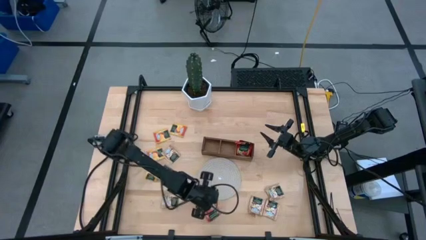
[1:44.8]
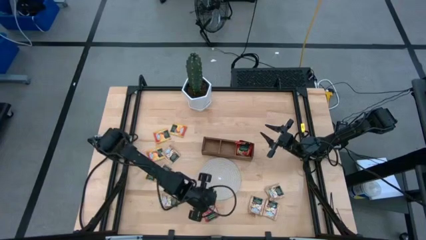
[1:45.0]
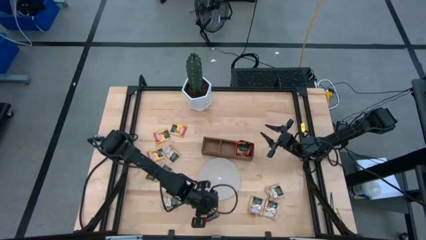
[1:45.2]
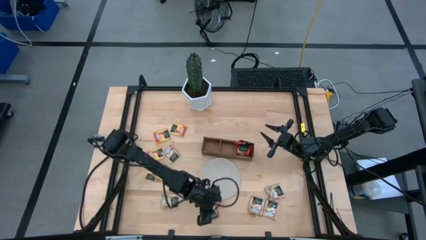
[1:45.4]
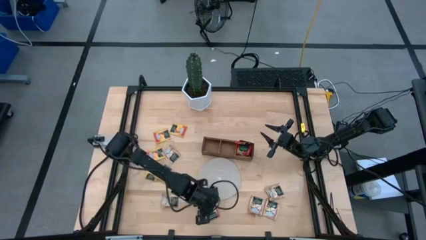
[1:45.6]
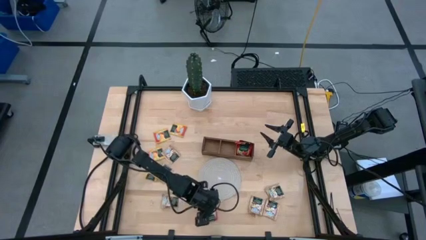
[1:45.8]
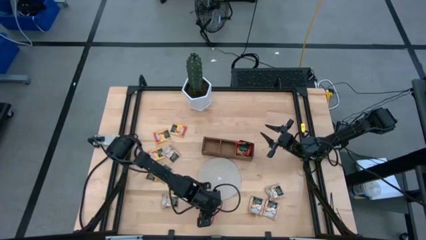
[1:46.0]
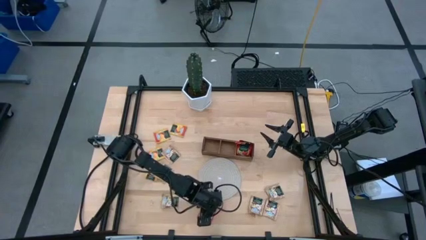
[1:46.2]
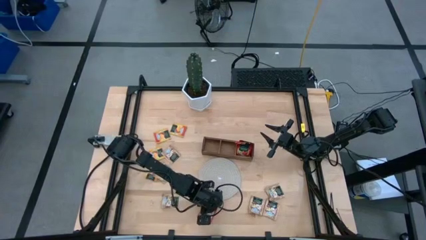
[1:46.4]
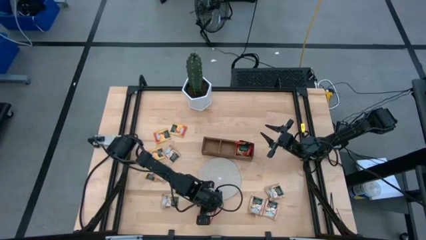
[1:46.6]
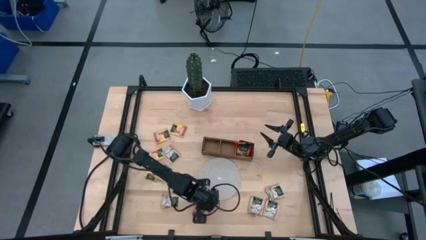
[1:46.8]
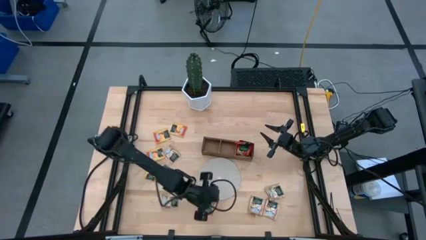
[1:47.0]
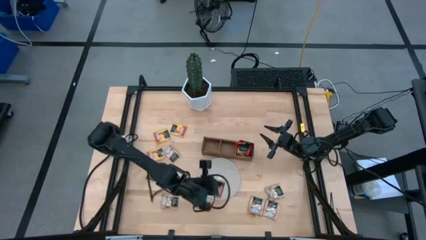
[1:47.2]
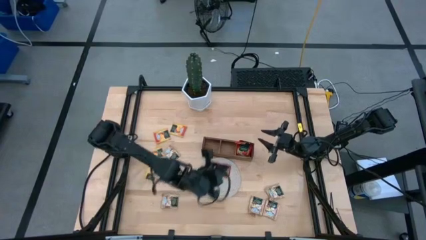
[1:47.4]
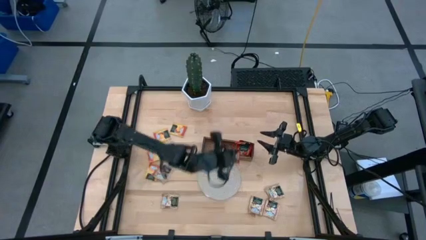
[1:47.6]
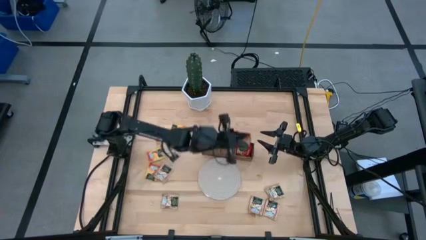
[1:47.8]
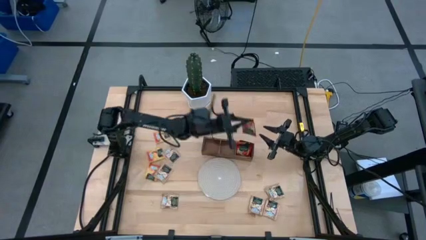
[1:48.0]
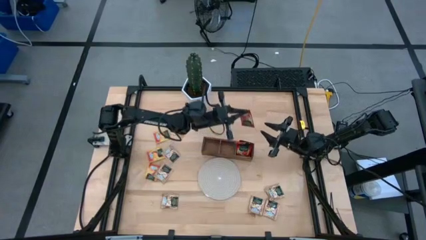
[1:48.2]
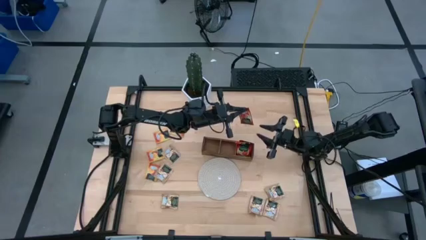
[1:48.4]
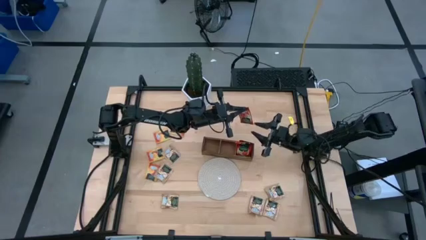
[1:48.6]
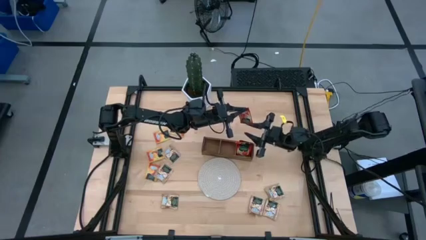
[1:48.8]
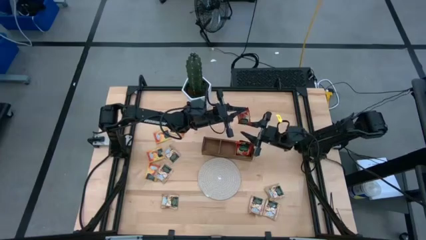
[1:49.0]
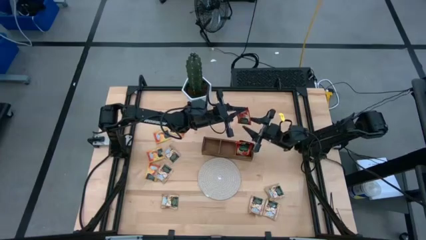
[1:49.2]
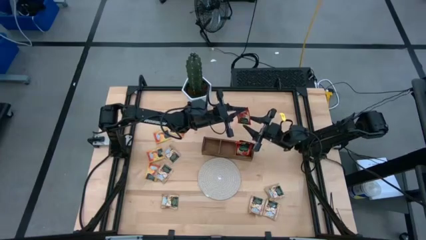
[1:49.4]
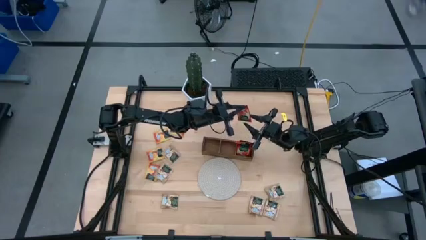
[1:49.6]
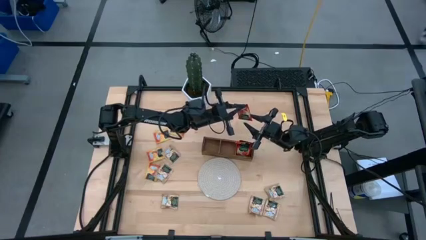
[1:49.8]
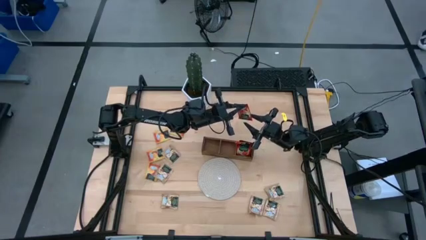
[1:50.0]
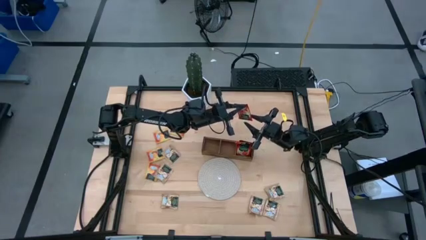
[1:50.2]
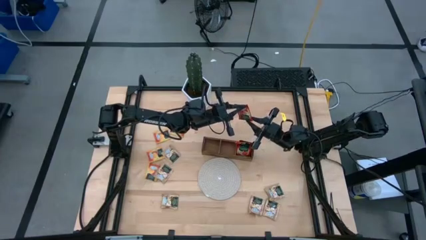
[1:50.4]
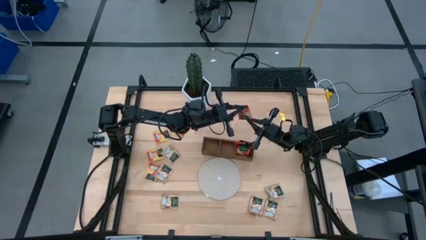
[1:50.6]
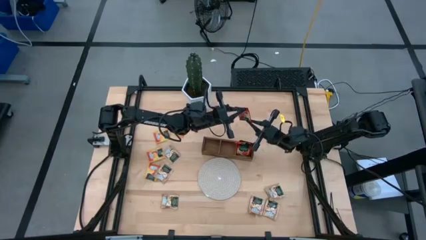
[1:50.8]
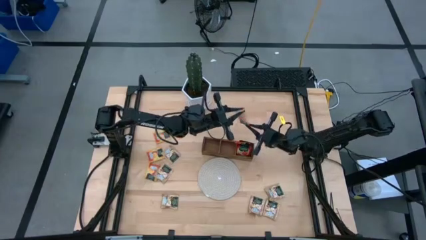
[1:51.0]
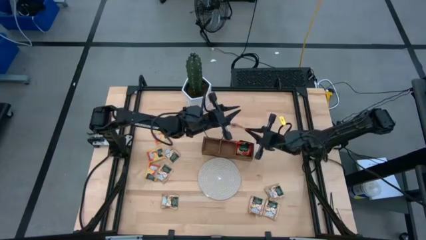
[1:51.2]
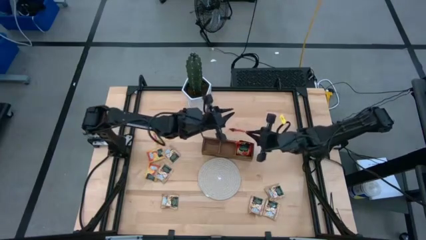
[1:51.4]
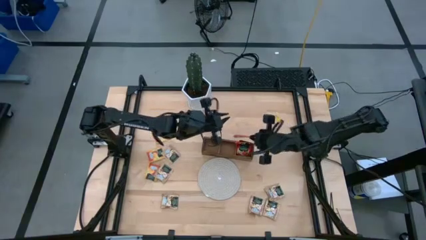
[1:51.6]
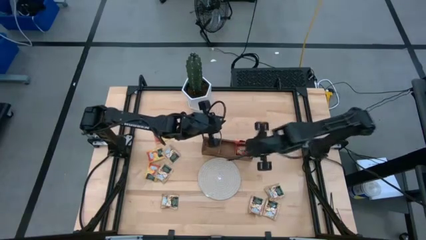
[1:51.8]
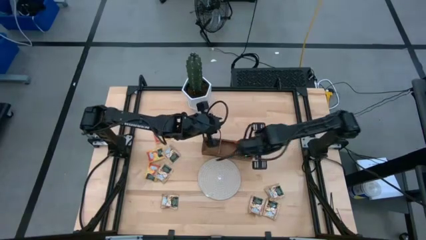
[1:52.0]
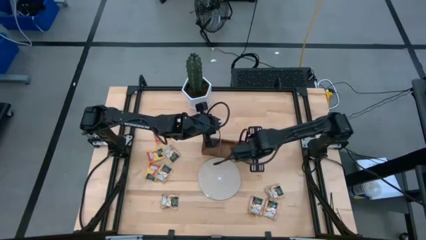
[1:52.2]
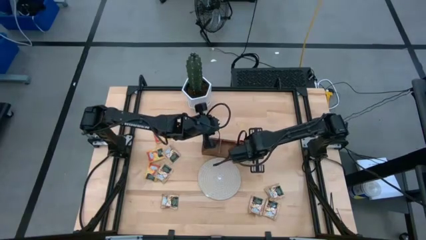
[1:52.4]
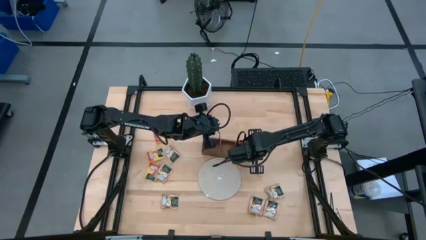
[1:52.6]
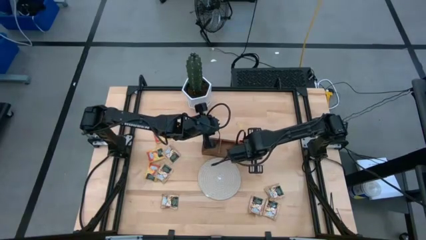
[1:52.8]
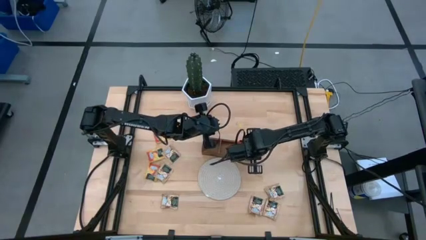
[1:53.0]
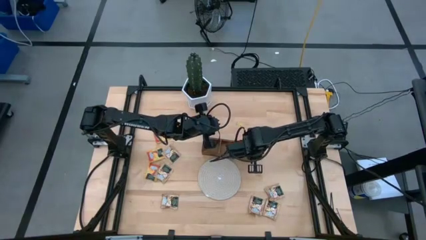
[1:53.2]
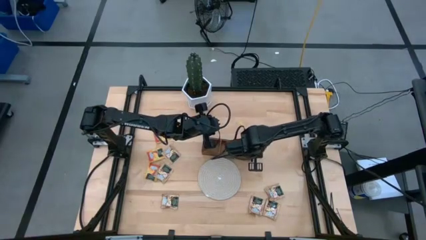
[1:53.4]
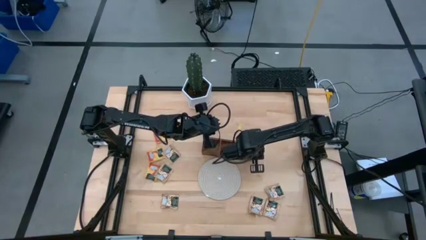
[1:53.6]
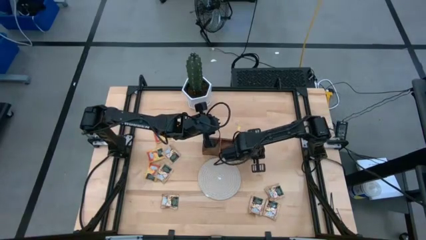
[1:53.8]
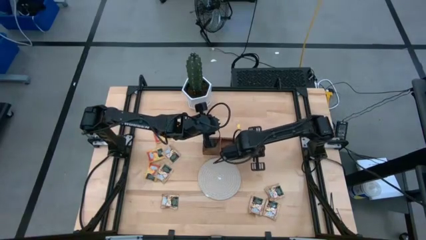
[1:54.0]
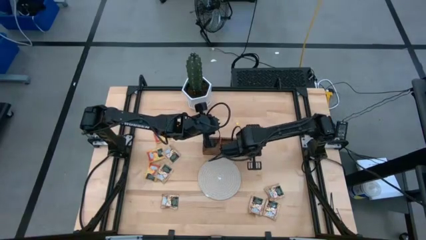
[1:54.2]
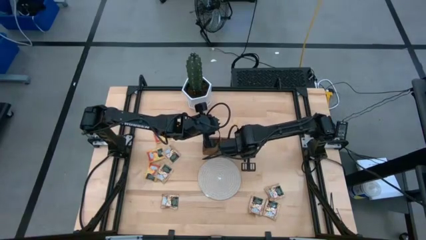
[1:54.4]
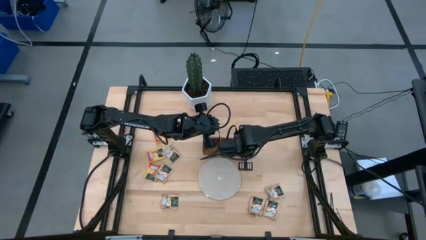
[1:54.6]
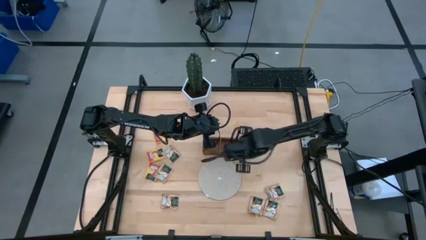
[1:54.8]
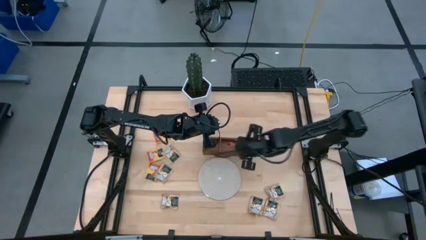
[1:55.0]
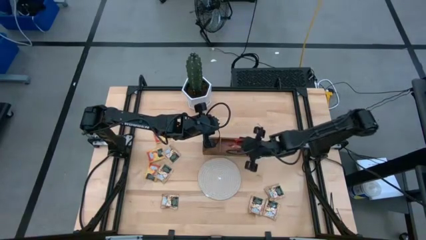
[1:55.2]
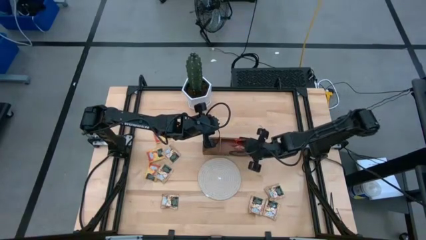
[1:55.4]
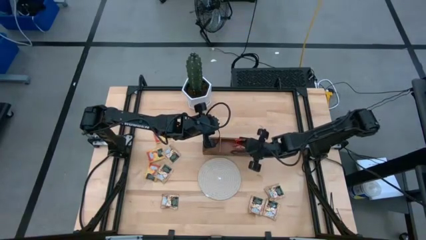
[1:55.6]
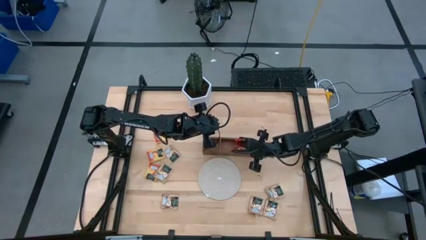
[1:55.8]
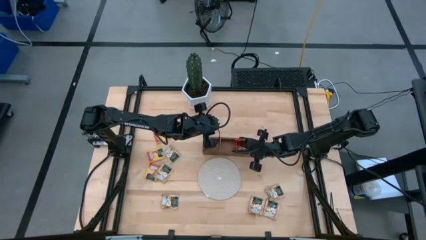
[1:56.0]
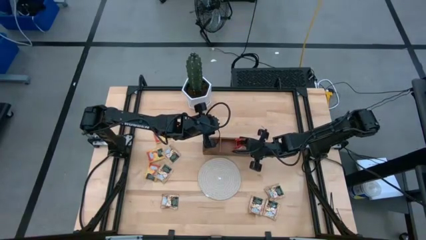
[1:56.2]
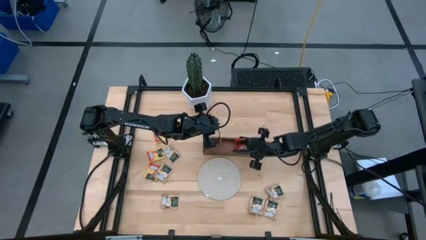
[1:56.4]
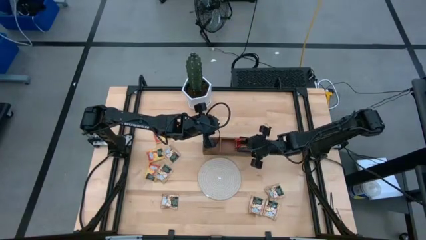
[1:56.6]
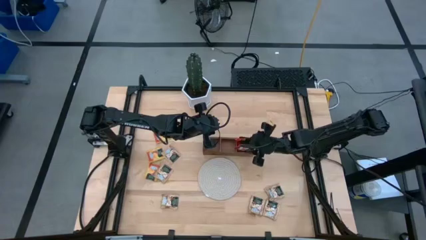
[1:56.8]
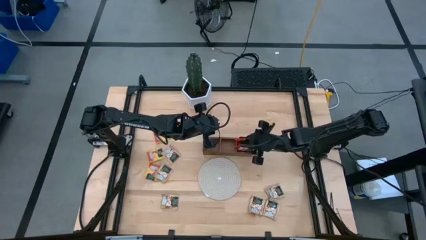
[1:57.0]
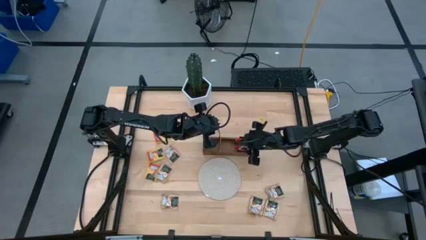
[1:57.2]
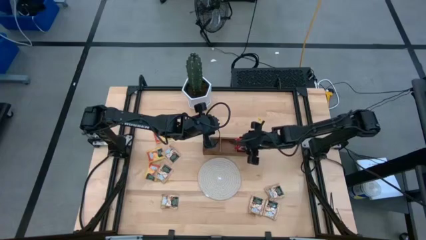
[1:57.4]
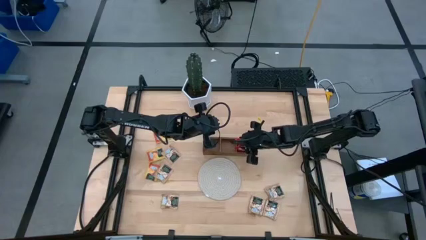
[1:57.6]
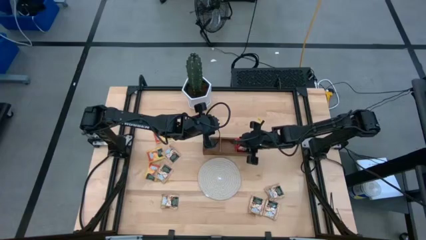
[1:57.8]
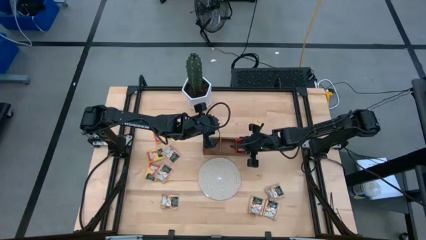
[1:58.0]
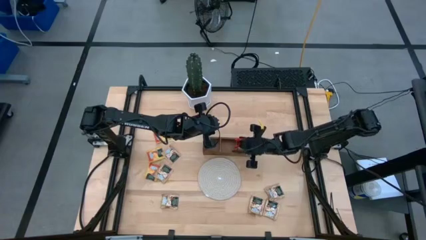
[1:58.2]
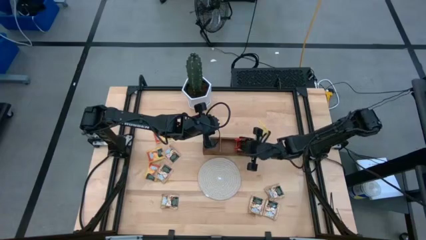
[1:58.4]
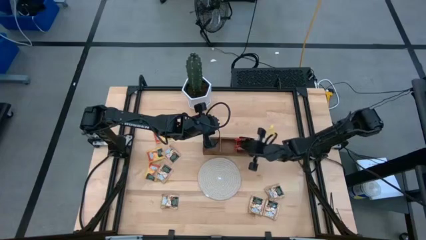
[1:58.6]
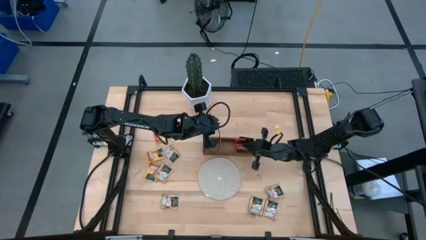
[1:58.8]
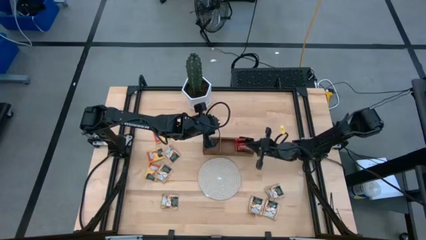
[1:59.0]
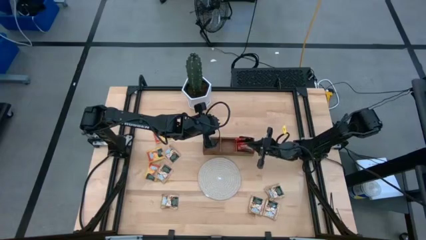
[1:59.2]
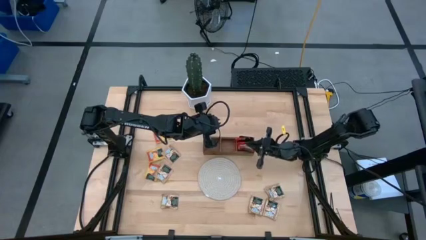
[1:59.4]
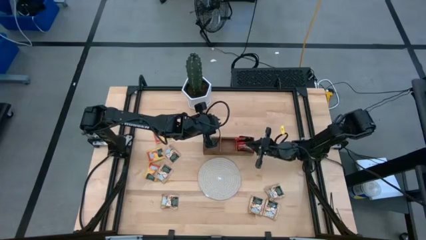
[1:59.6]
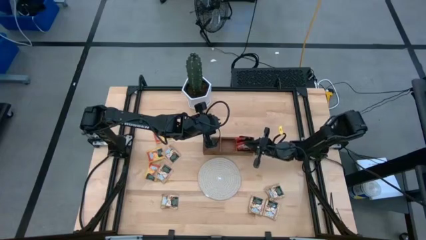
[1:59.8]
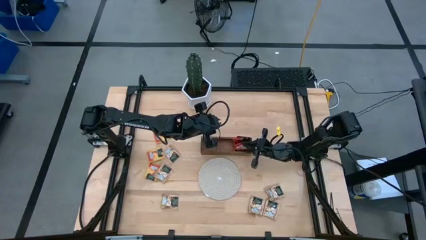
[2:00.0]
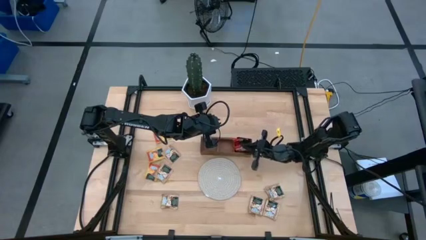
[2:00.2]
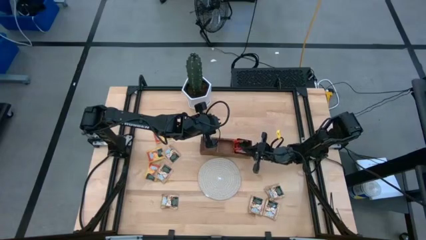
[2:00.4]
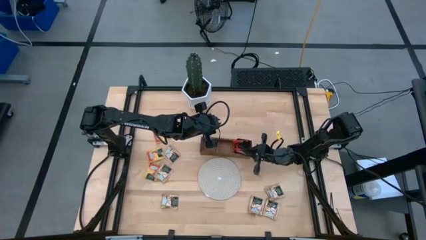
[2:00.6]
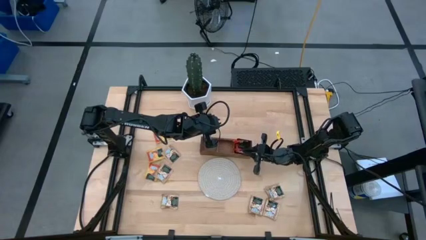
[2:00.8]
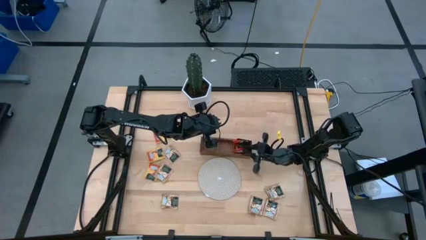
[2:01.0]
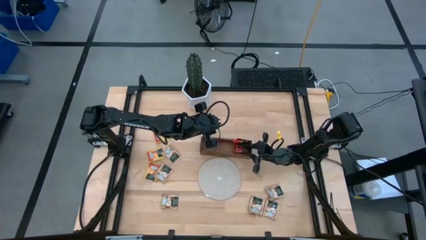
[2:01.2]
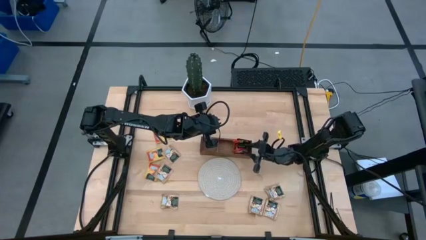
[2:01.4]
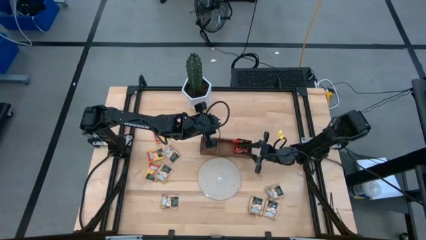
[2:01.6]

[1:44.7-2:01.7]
Task: Pick & Place Tea
Put the red tea bag into the right section of the wooden organizer
